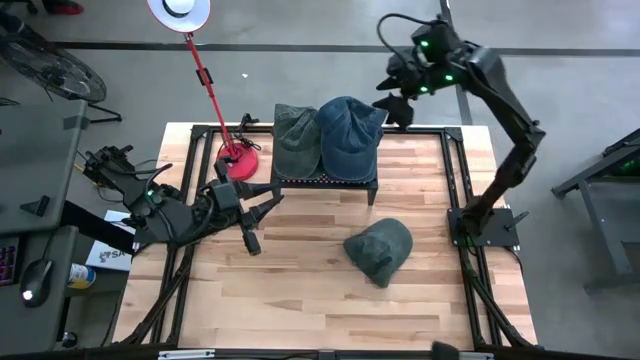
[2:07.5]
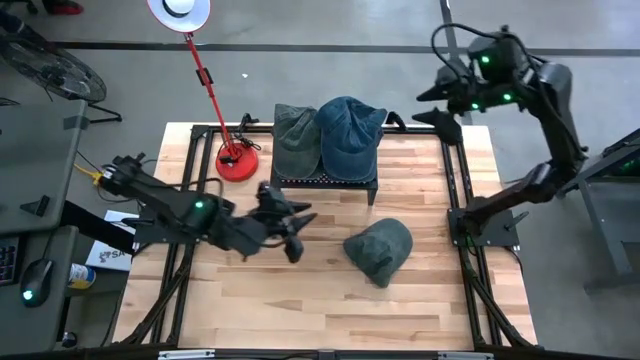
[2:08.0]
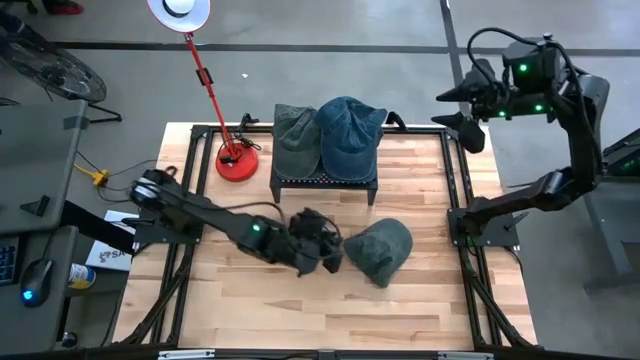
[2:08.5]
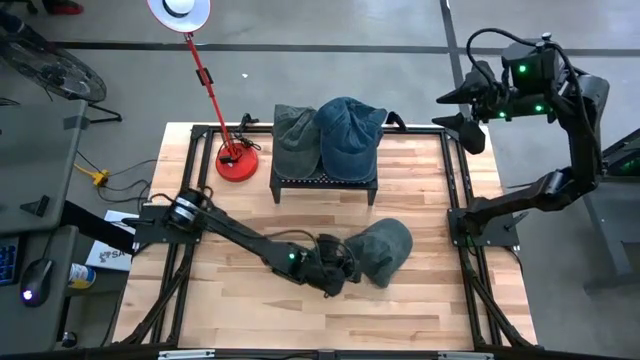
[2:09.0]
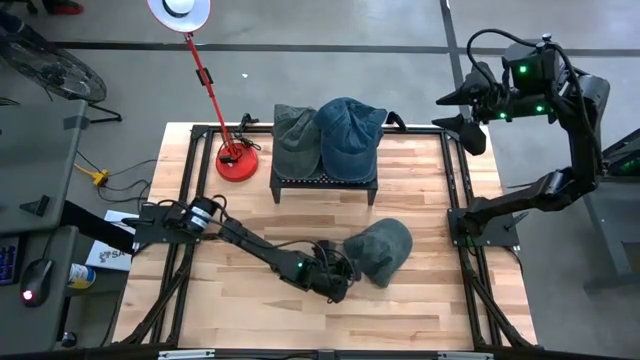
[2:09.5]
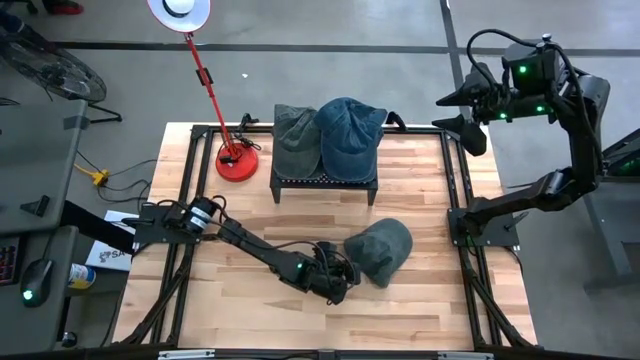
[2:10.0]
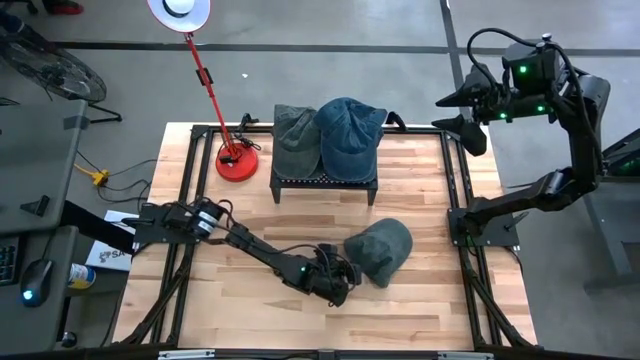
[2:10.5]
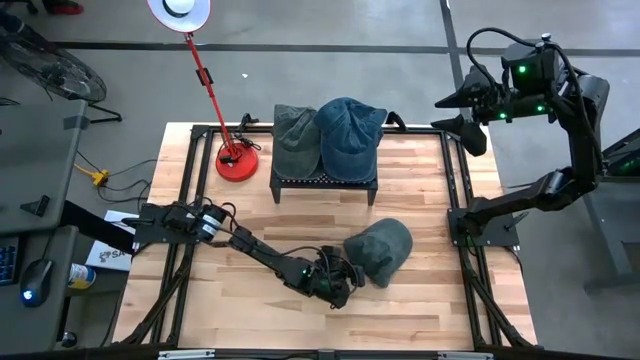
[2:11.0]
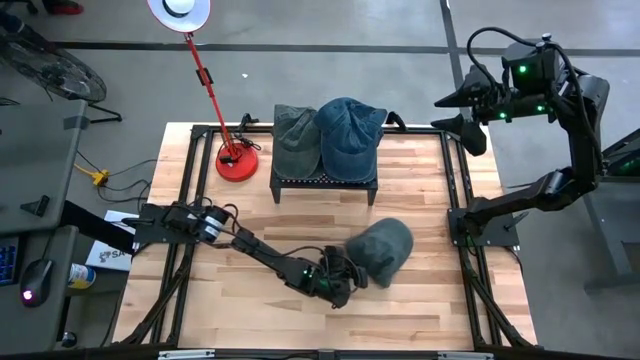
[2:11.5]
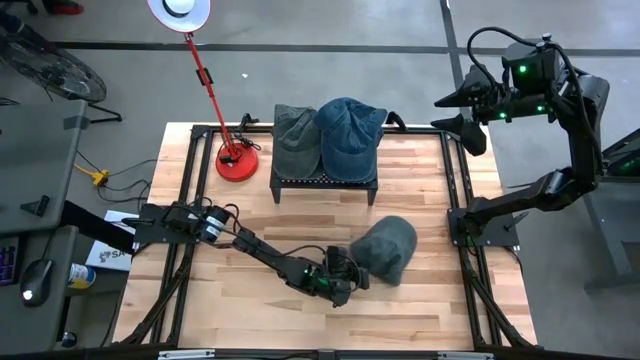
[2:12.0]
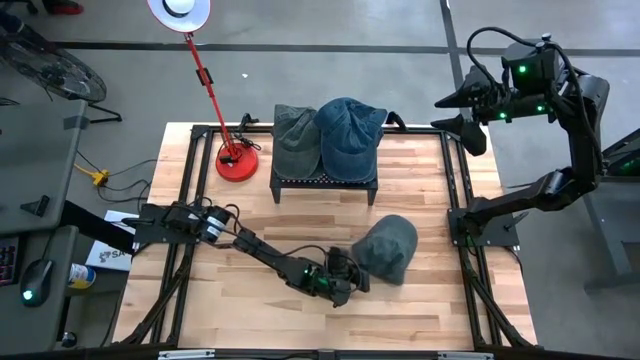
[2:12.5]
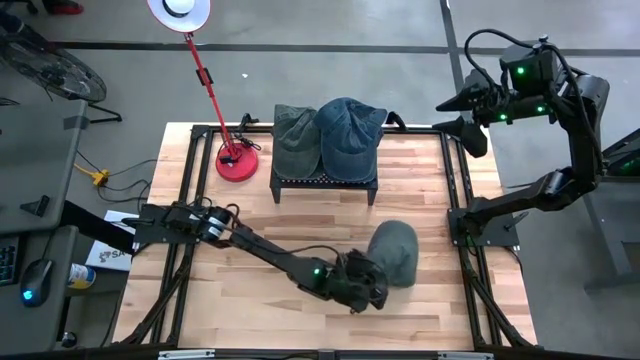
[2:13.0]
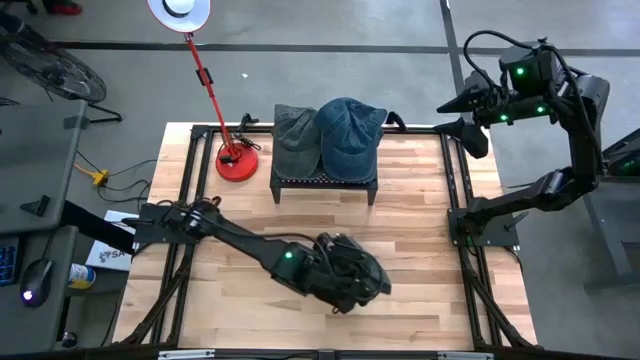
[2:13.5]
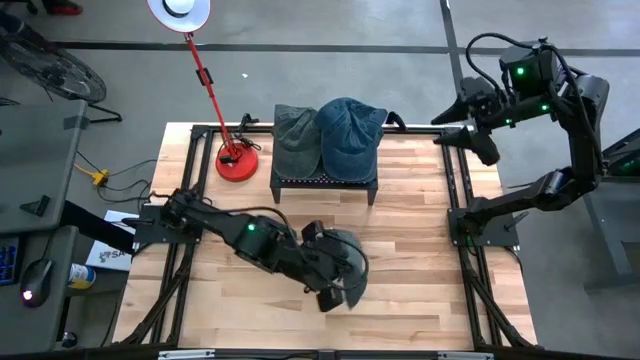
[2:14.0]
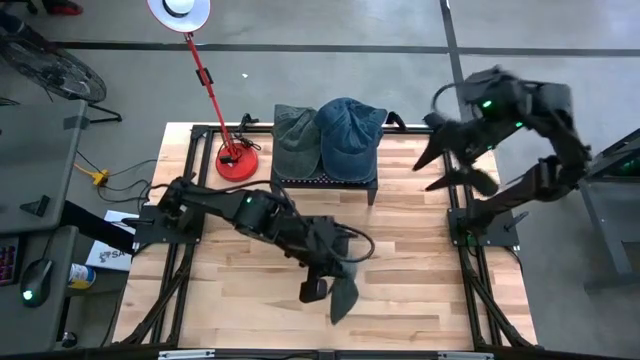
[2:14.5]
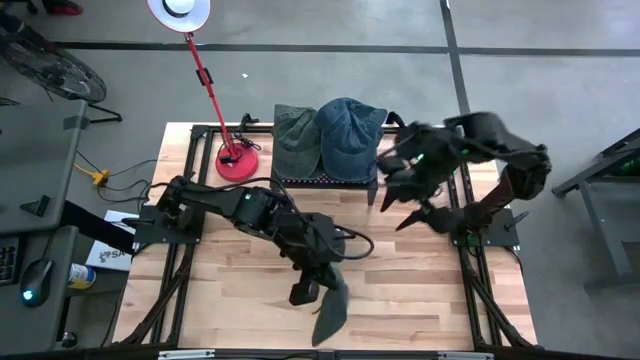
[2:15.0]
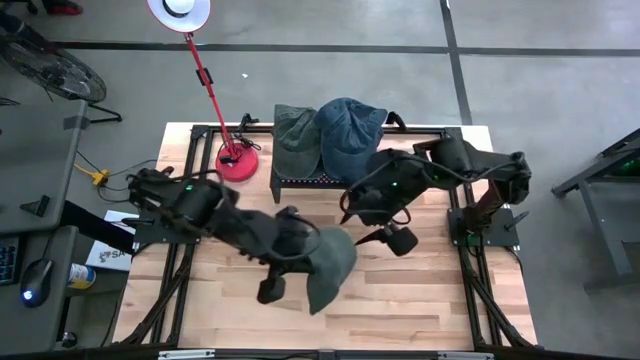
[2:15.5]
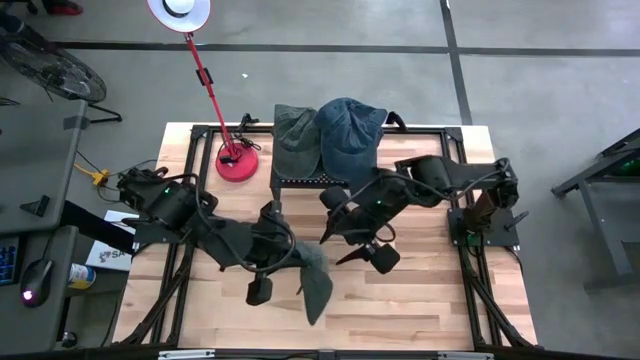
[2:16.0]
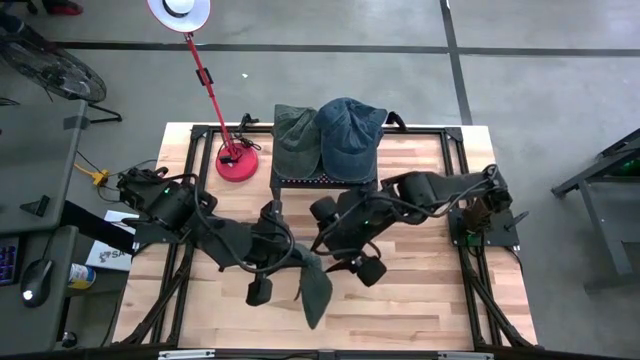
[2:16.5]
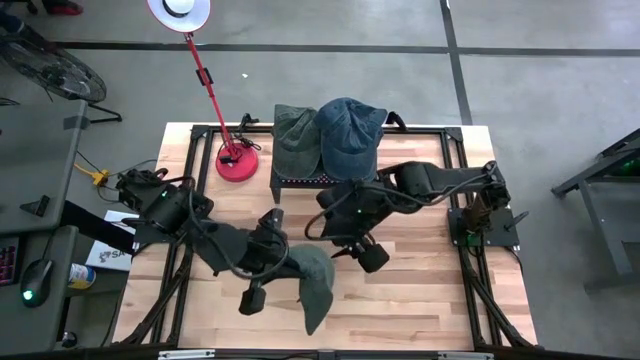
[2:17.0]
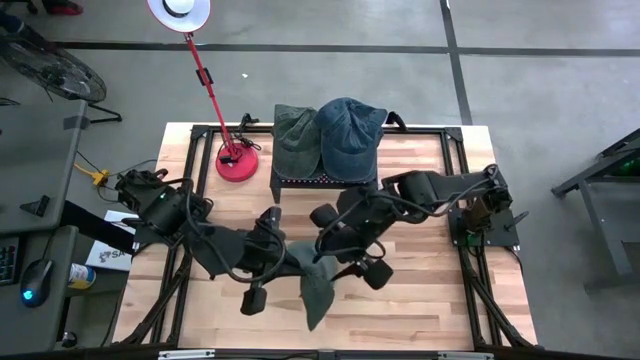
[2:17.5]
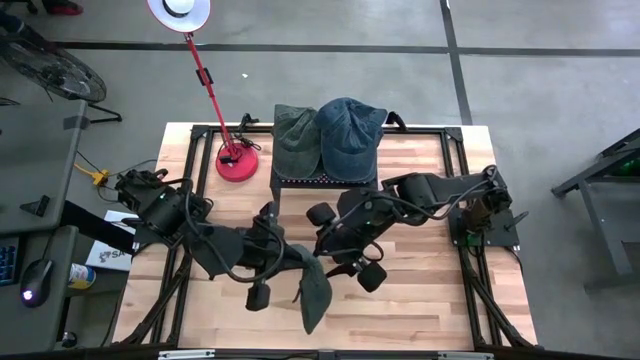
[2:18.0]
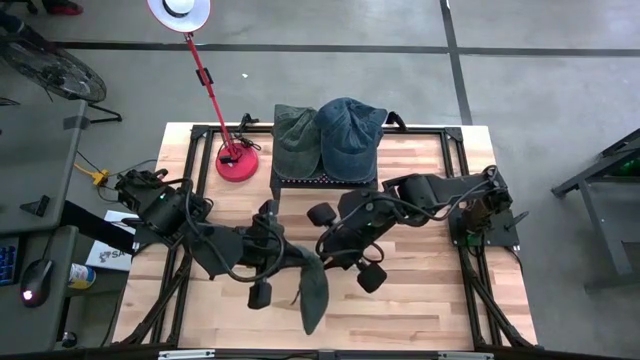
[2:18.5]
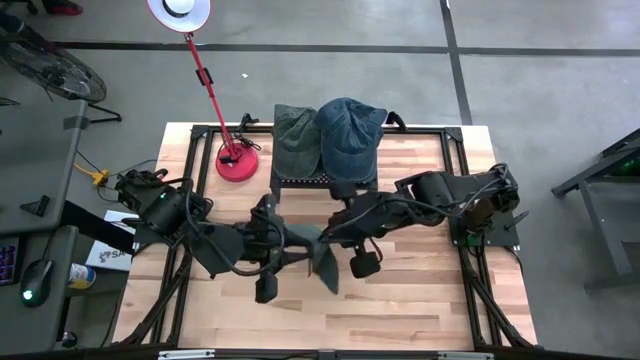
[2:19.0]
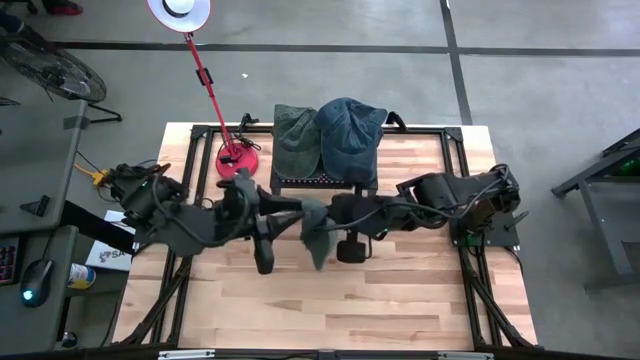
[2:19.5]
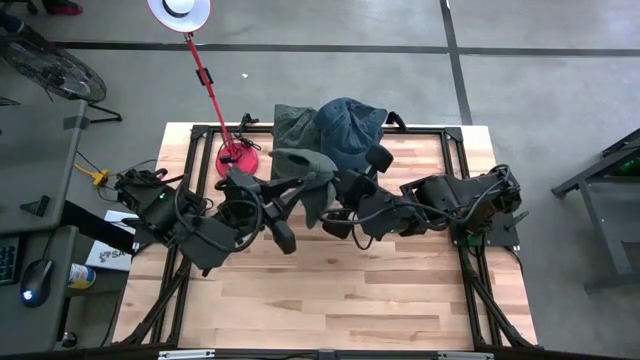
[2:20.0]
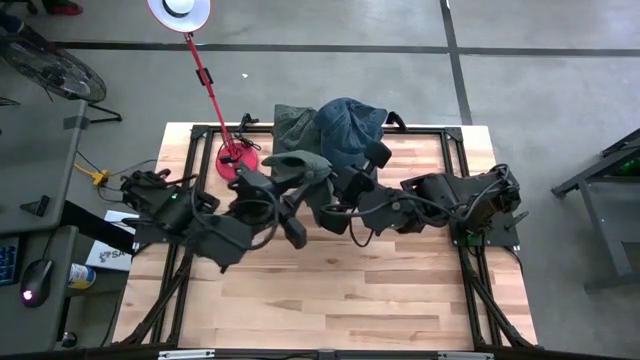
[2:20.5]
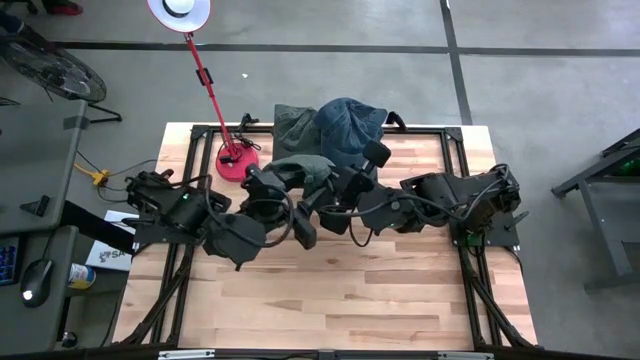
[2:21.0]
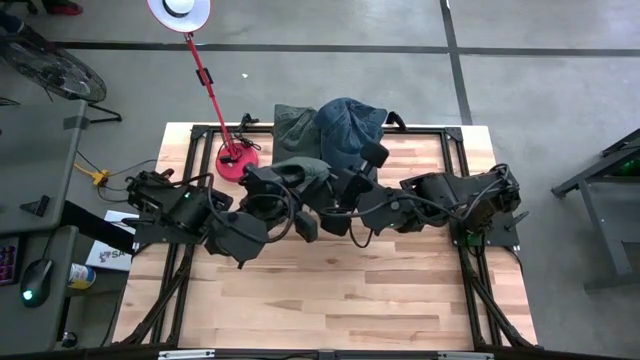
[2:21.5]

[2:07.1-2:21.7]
Task: Pick & Place hat
Stack the gray cap on top of the other gray cap on the shelf

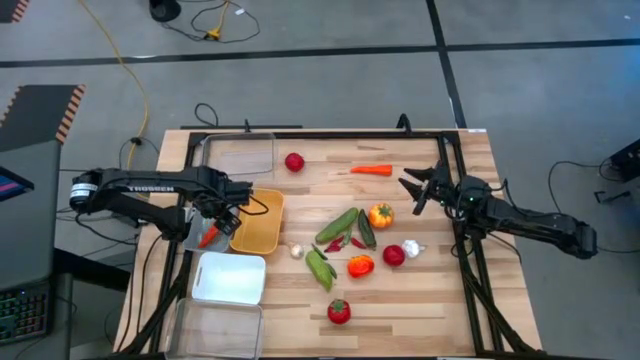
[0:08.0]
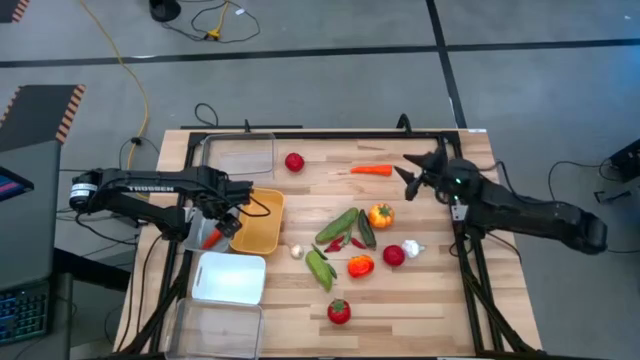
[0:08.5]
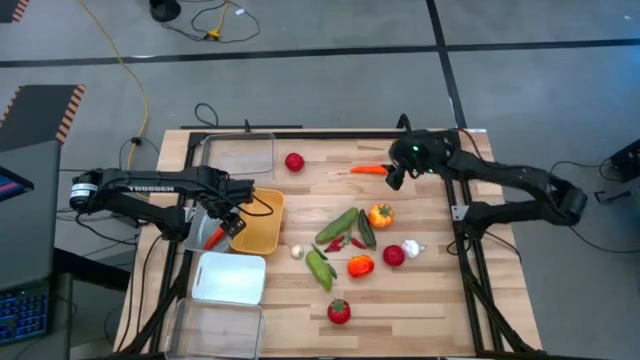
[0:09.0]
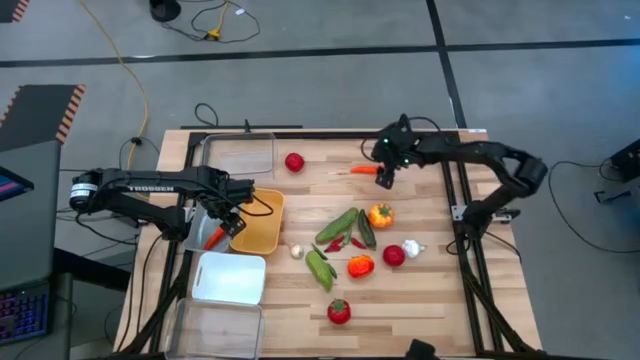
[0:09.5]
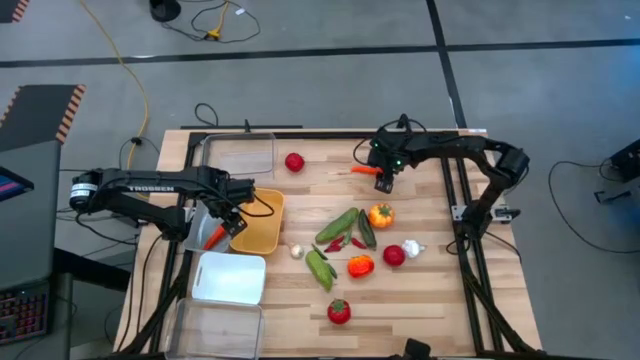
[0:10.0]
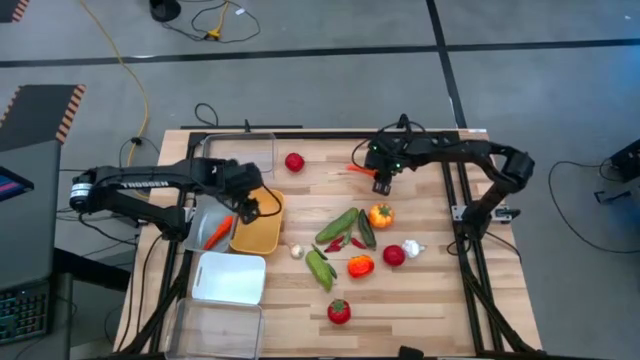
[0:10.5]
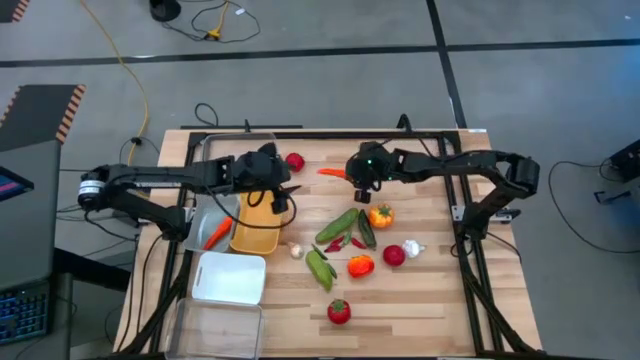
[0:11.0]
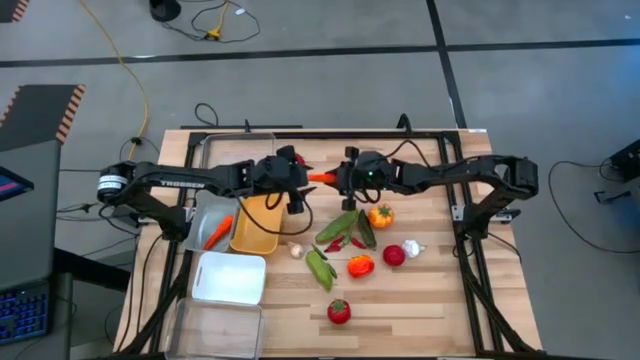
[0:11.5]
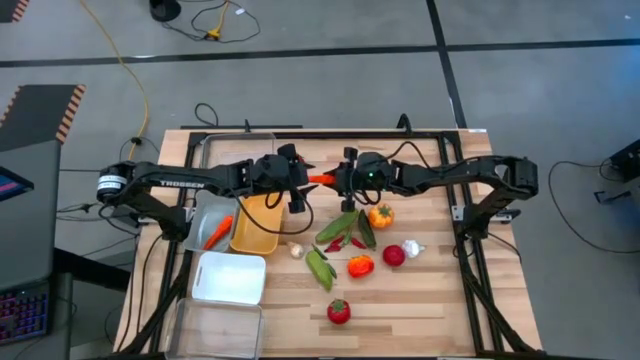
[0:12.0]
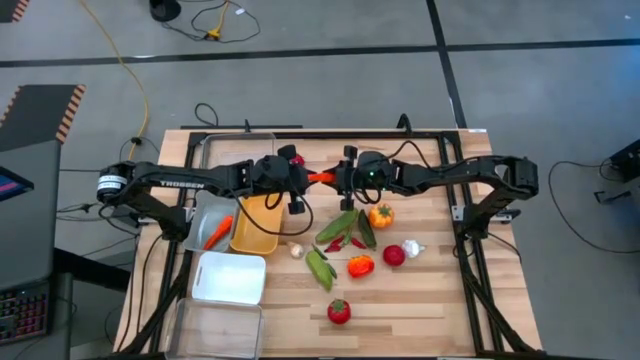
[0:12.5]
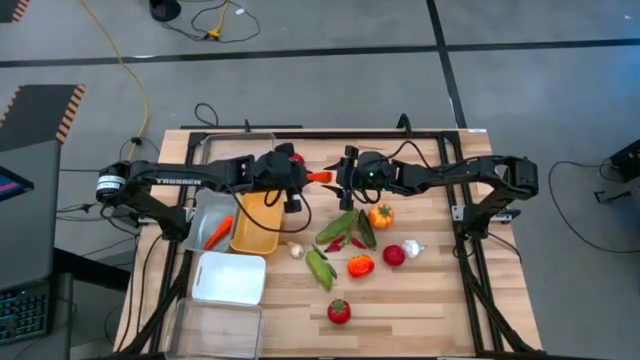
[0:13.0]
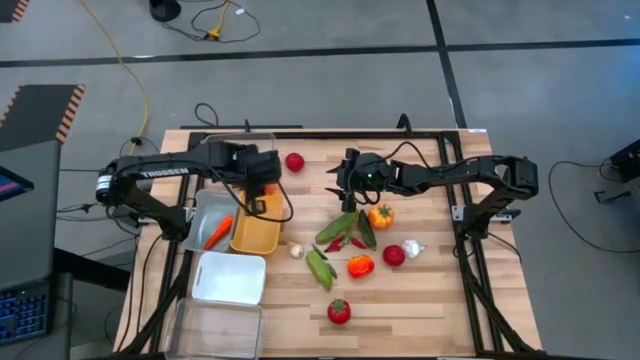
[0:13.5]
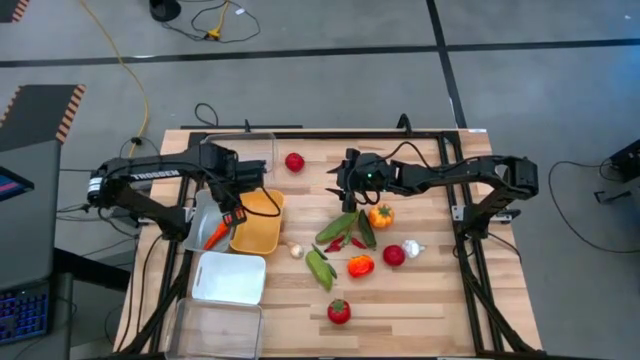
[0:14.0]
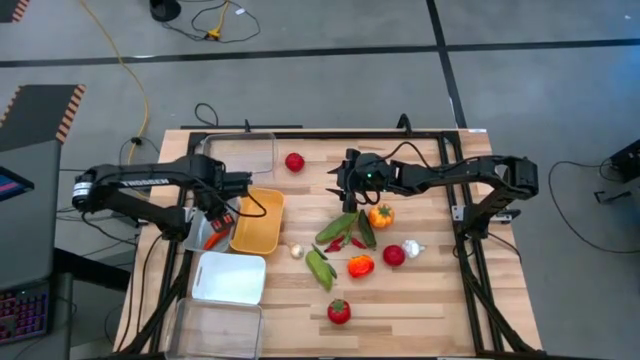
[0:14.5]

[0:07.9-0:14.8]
Task: Sort produce into baskets
Put the top center carrot into the gray bin
